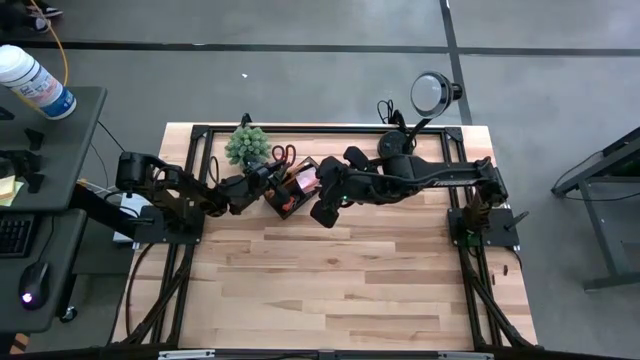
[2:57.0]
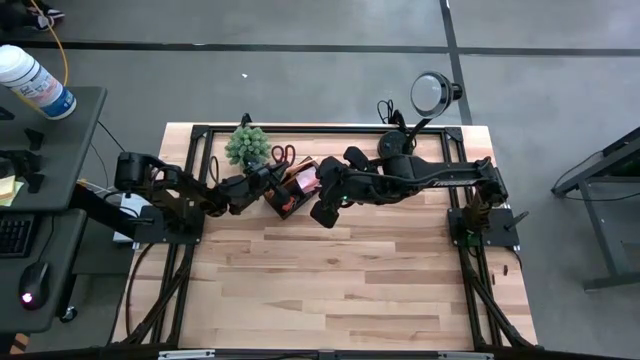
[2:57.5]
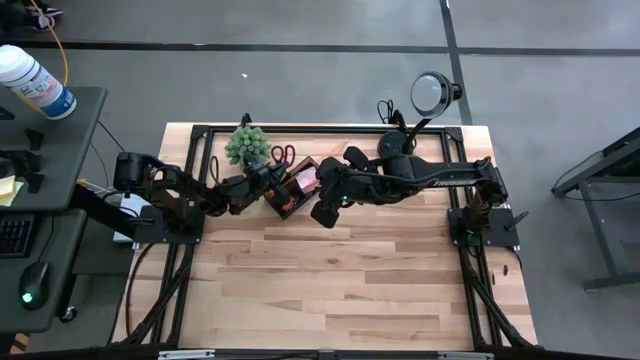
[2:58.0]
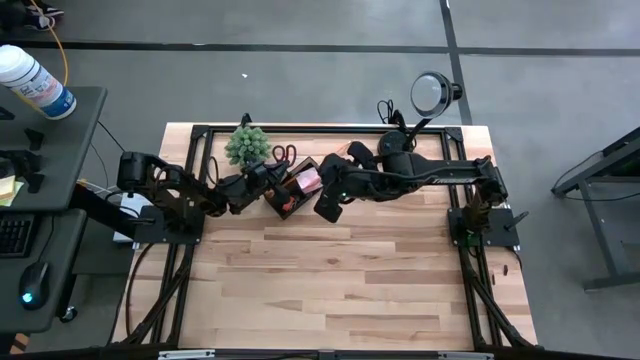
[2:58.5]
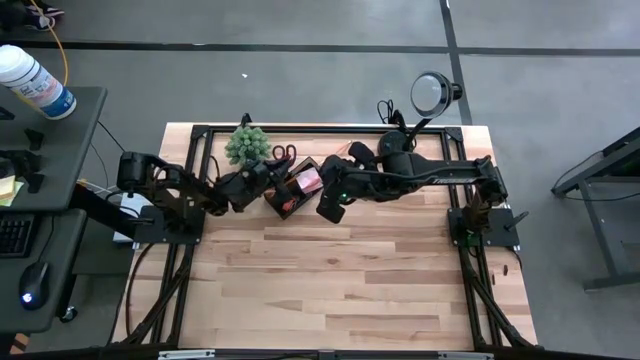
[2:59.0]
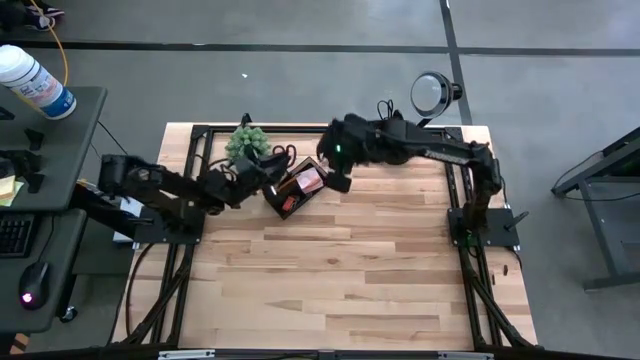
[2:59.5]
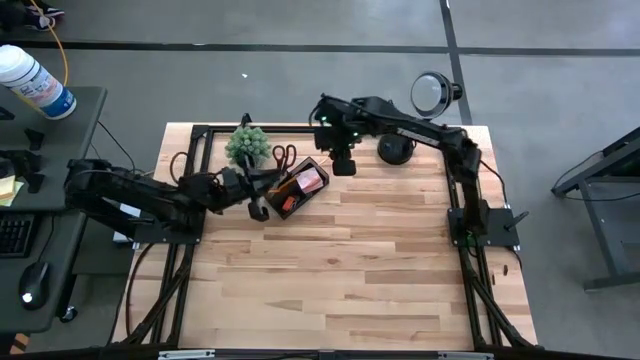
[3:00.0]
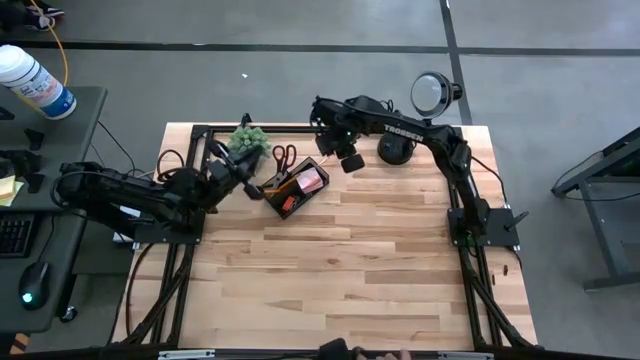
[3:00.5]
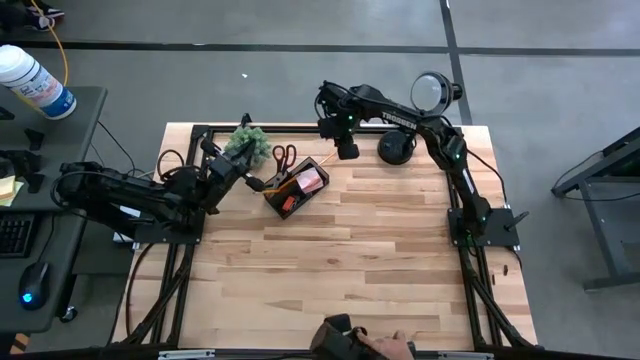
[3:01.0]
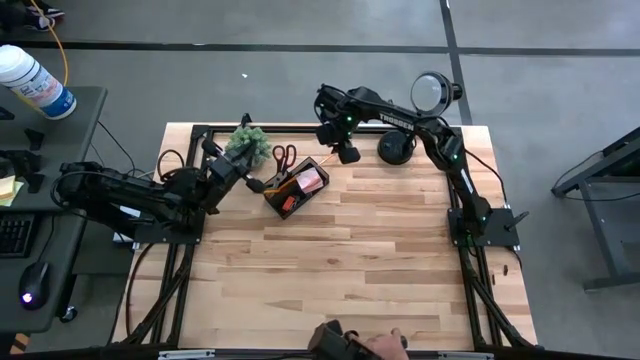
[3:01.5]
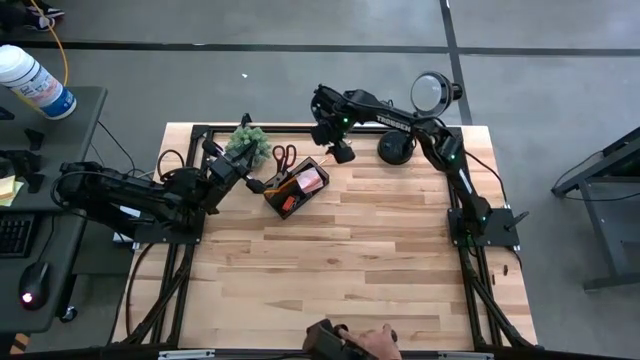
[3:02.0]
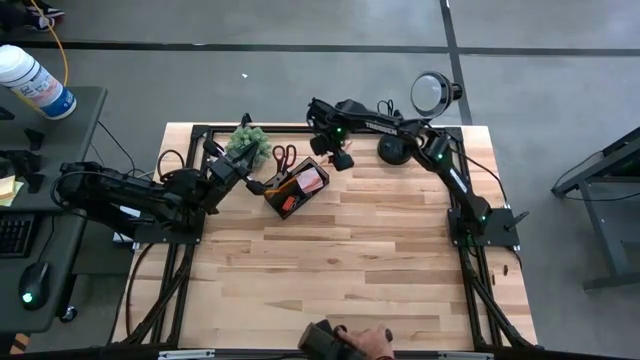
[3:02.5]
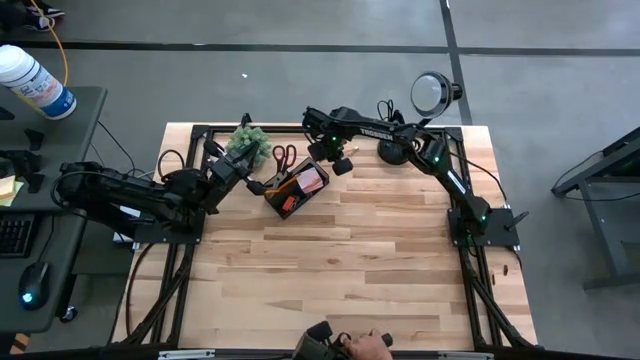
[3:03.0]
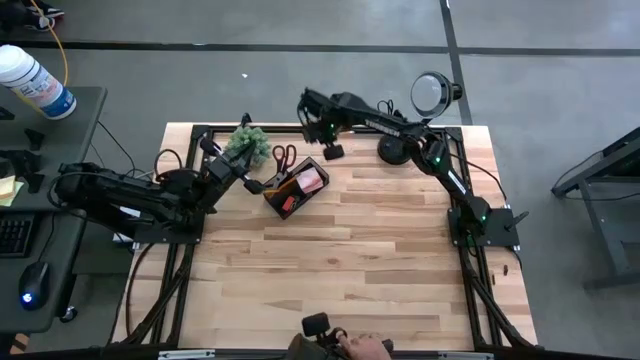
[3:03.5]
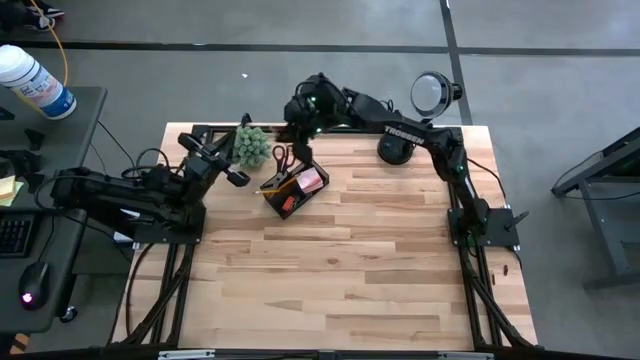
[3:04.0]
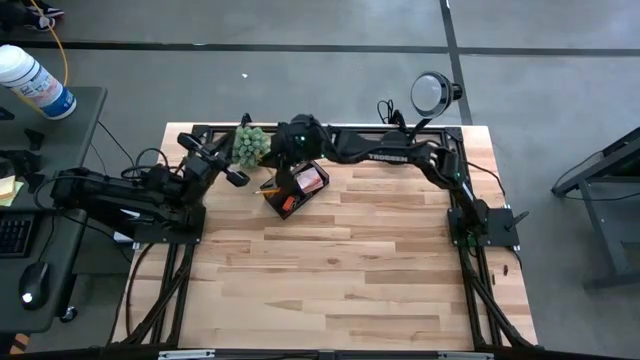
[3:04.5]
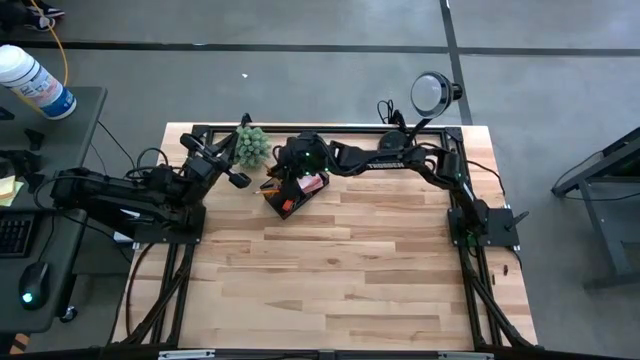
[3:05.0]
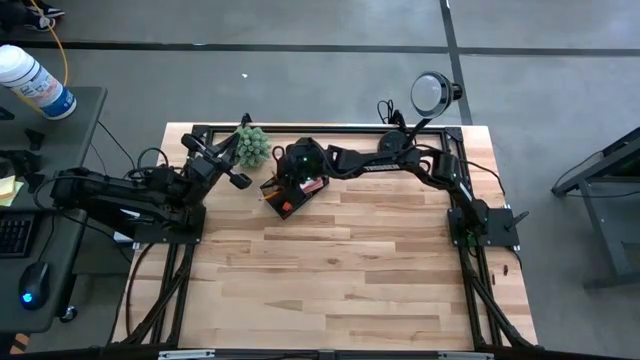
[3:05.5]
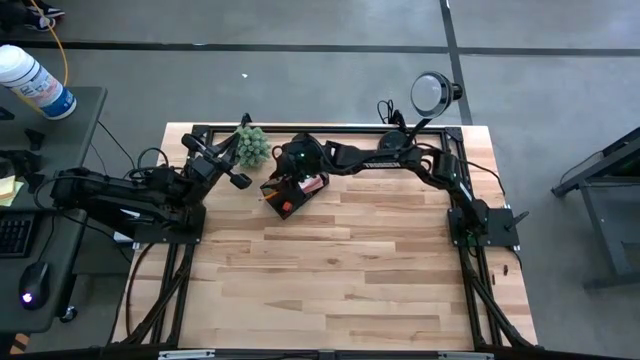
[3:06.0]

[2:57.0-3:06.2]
Task: Pick and place office supplies into organizer
Put the orange pencil into the black desk organizer

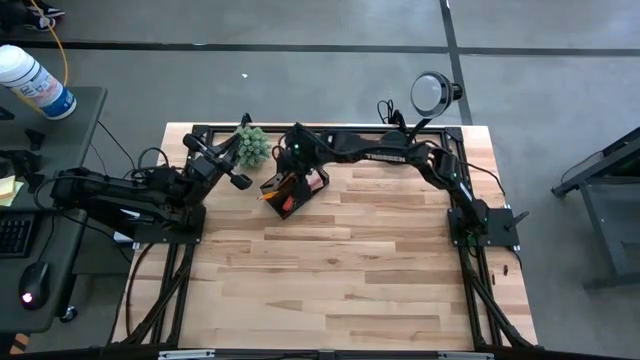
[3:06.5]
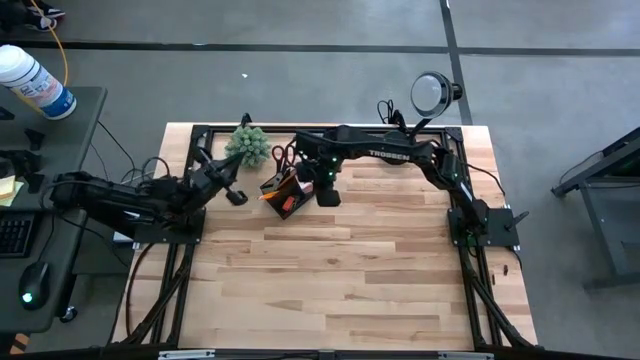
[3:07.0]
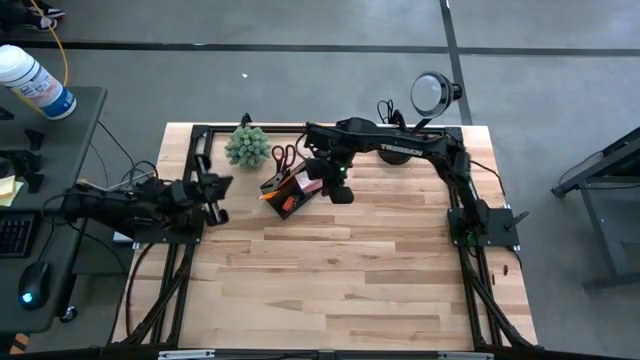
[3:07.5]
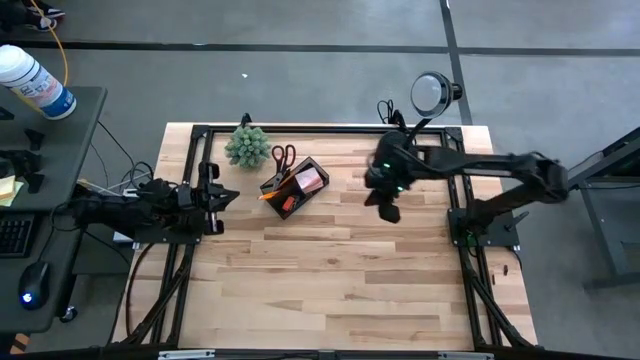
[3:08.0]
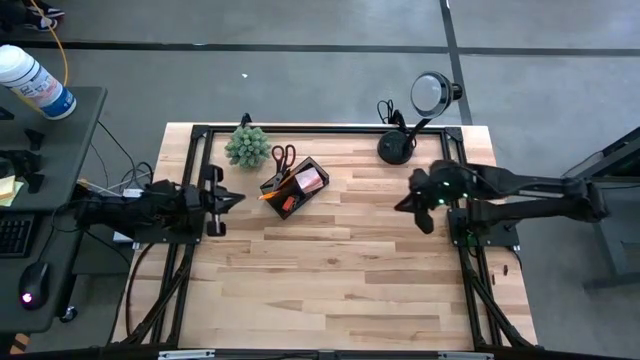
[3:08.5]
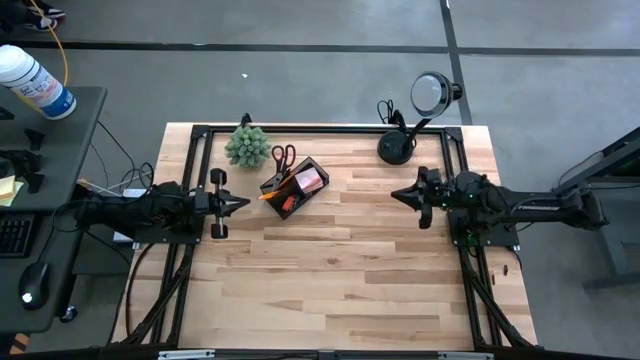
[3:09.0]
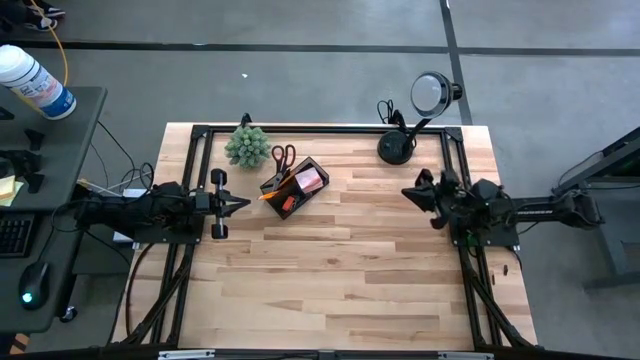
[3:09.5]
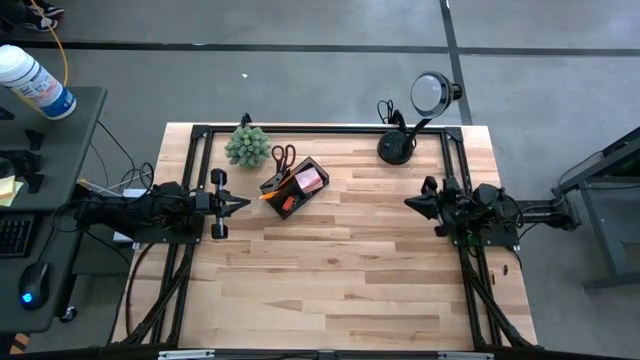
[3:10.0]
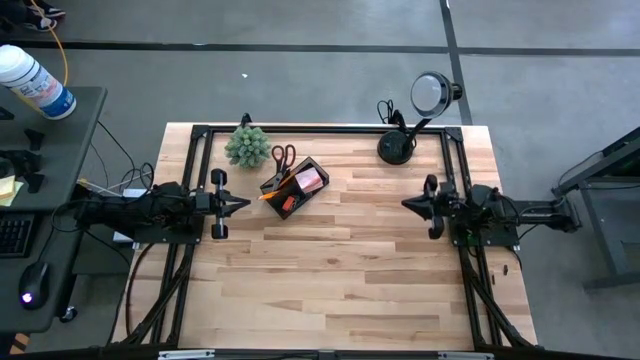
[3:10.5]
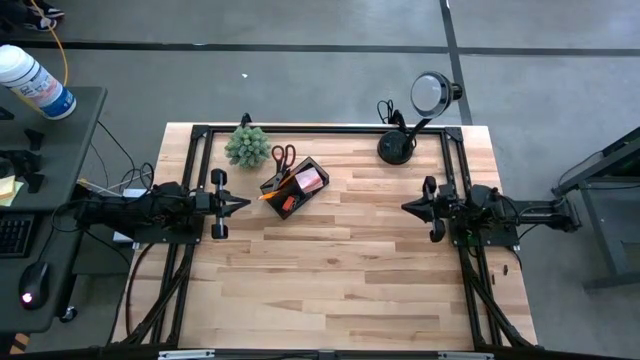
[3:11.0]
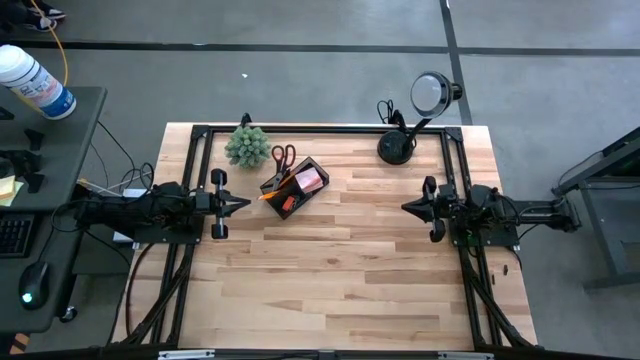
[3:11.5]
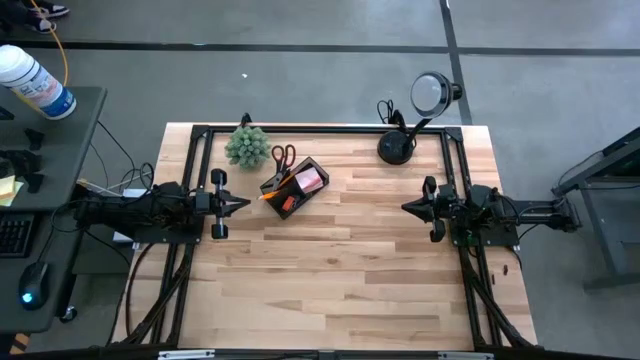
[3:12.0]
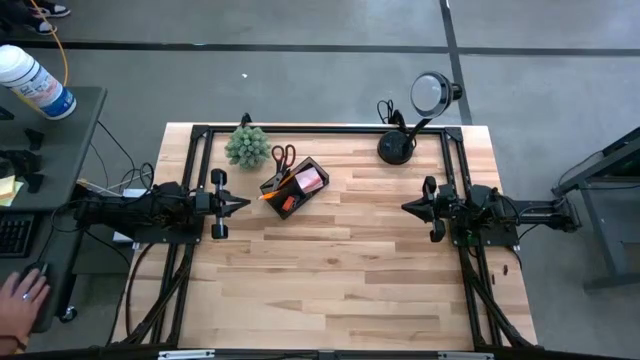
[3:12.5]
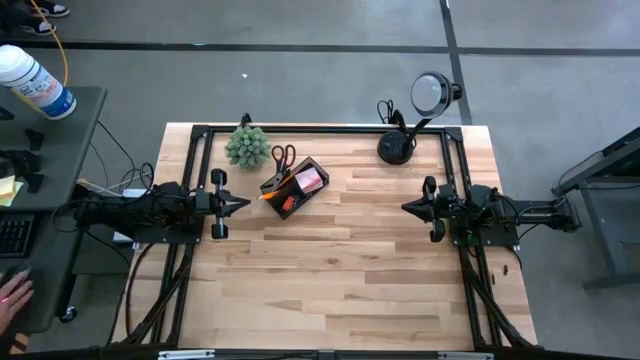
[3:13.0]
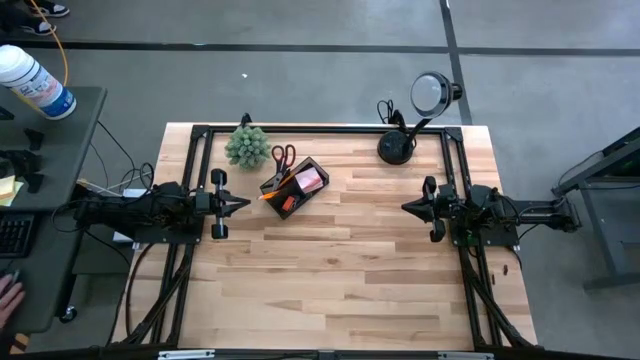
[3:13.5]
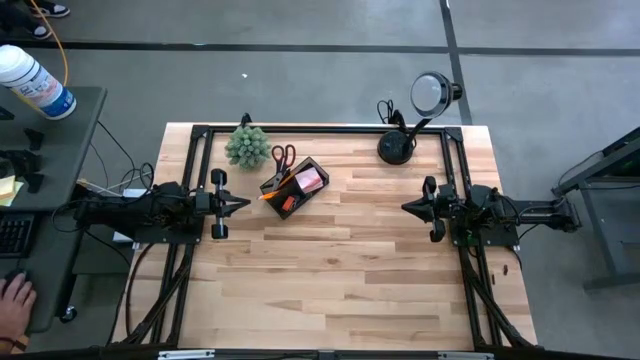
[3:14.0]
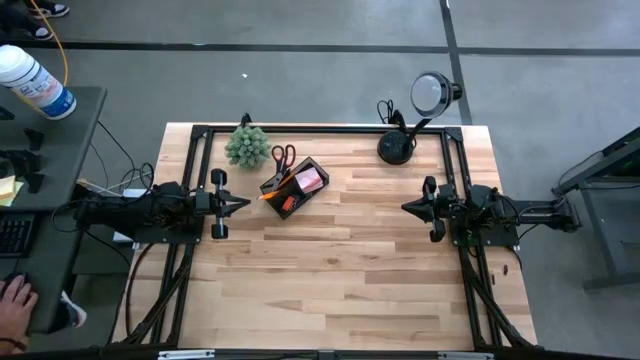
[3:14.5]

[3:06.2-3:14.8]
Return to Home Position

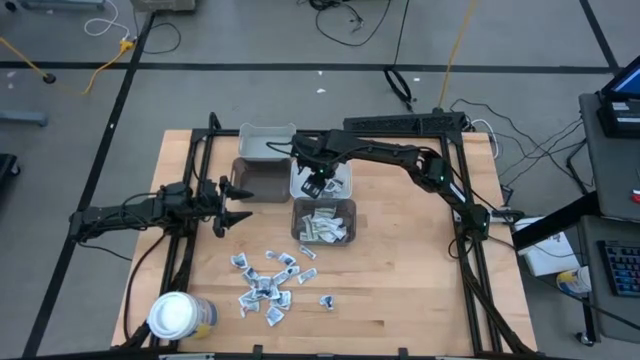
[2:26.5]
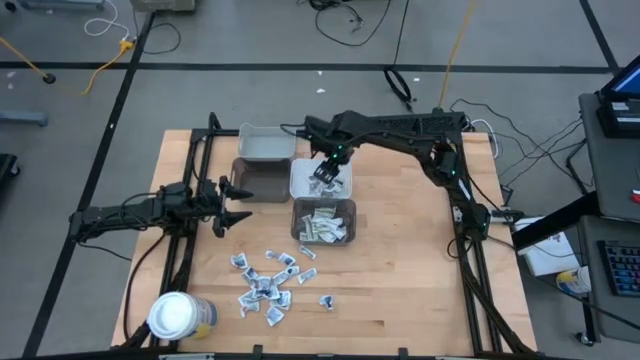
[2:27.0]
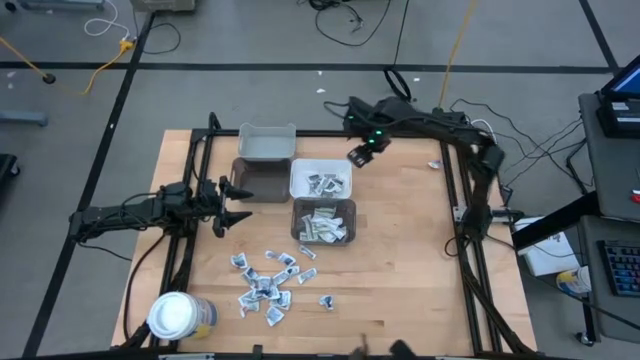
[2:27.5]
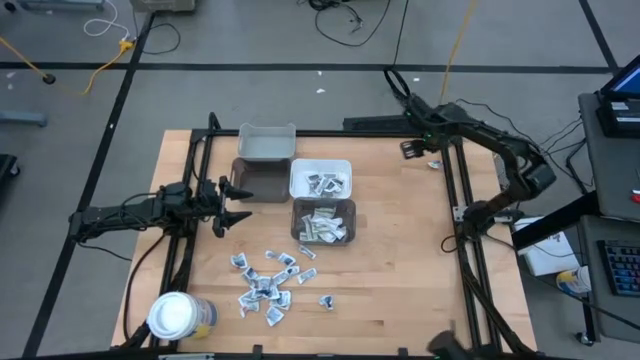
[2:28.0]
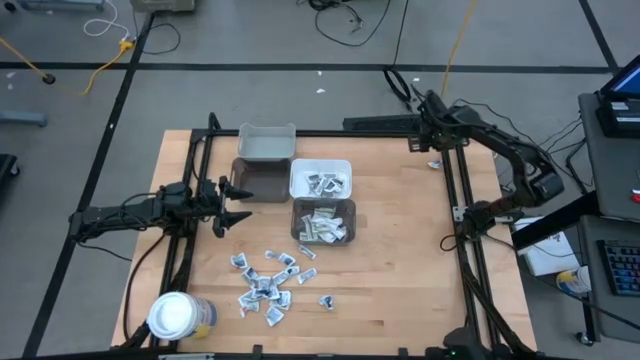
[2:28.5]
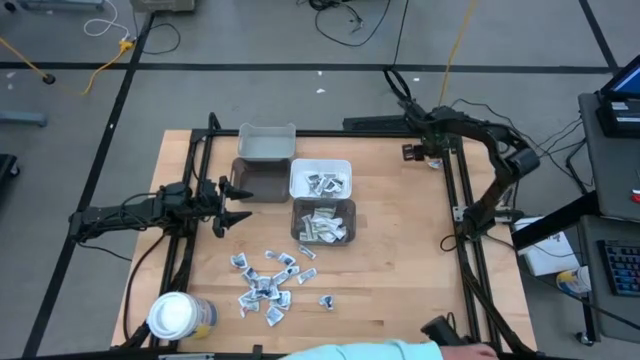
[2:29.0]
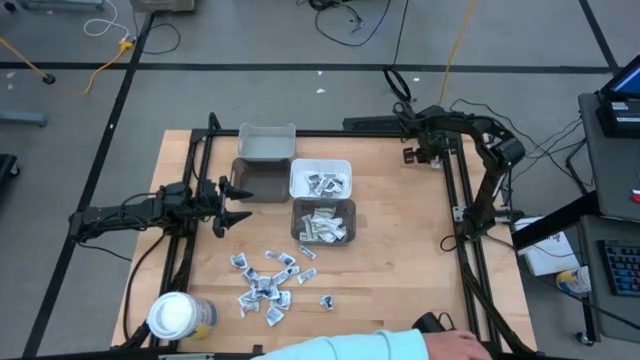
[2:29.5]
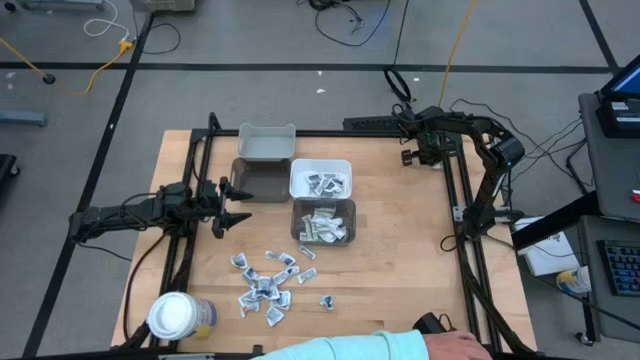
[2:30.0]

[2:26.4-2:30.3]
Task: Pick & Place First Aid Supplies
Put the gray towelette pack into the white bin
